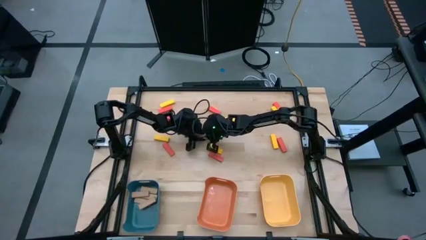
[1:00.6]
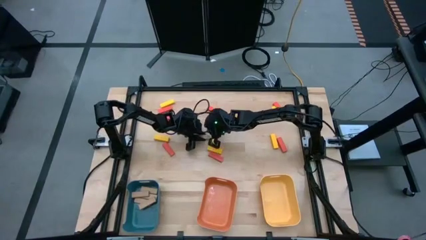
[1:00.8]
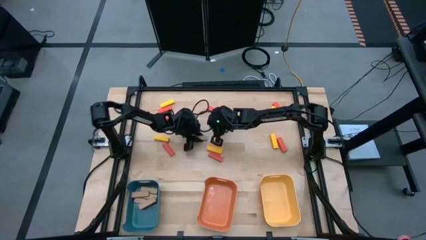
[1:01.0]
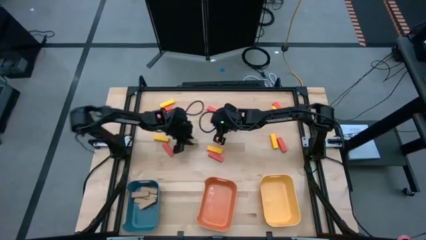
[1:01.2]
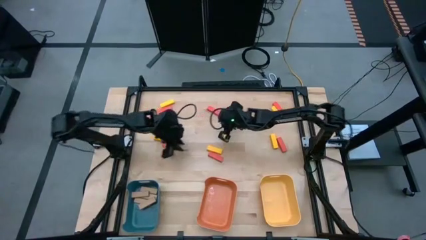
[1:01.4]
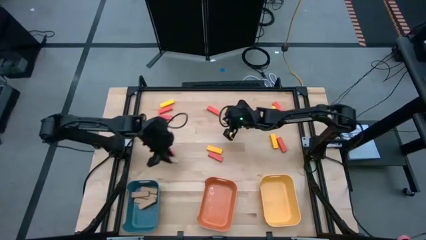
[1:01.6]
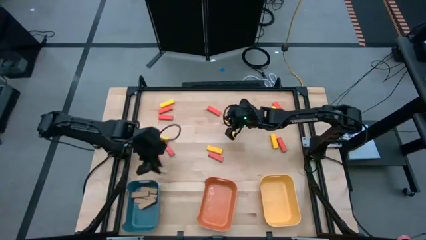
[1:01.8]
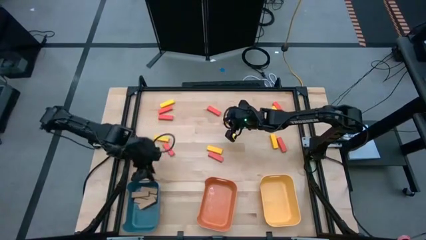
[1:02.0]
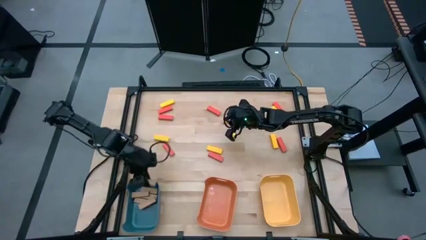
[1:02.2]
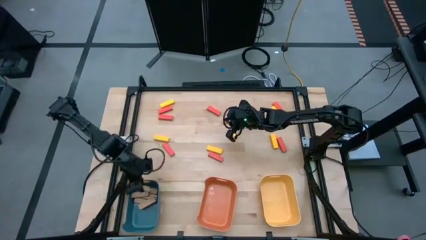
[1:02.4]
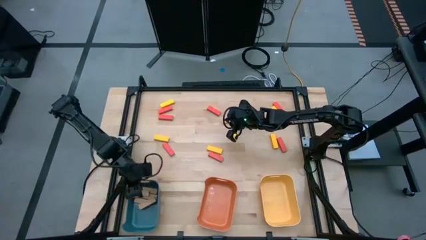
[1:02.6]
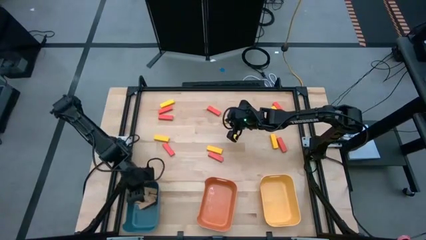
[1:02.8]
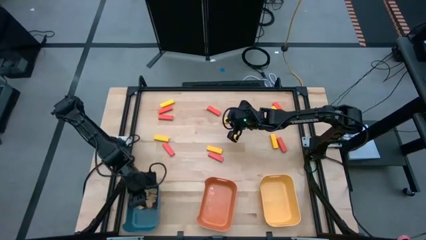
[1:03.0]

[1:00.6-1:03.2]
Task: Sort blocks
Put the brown block into the blue bin

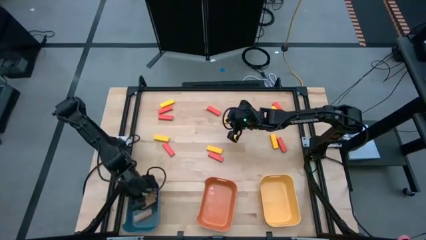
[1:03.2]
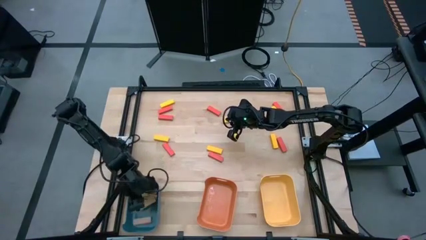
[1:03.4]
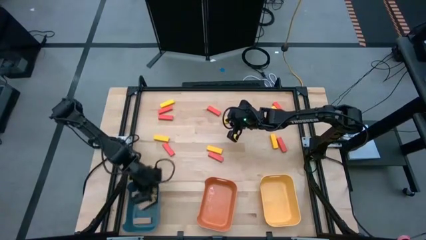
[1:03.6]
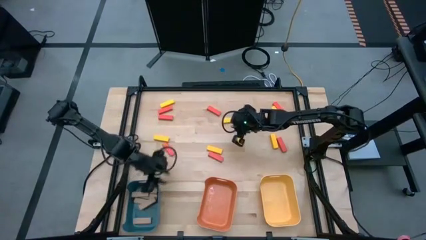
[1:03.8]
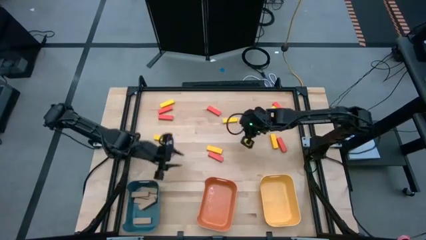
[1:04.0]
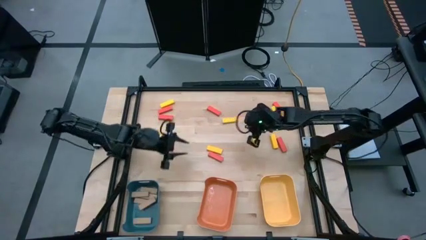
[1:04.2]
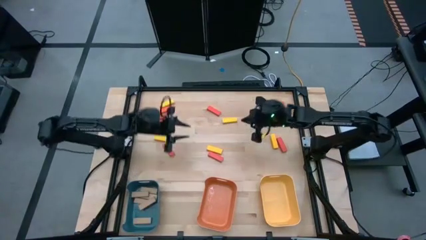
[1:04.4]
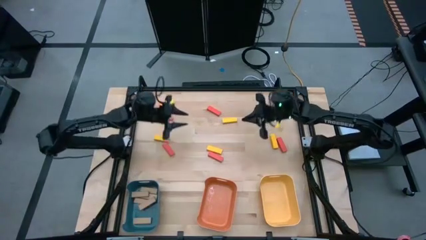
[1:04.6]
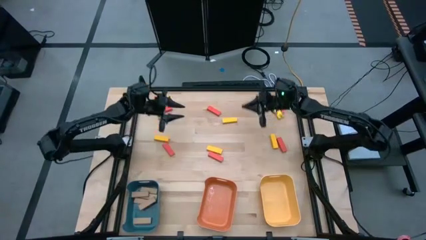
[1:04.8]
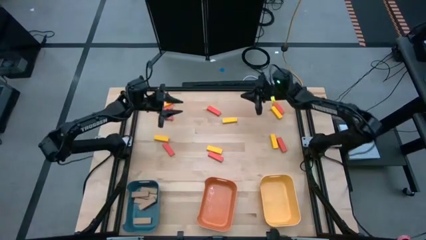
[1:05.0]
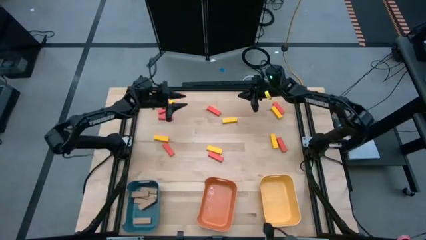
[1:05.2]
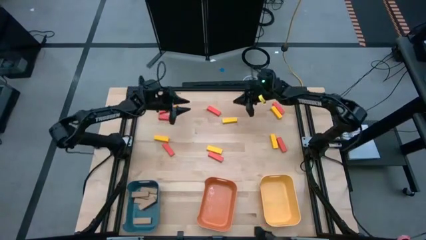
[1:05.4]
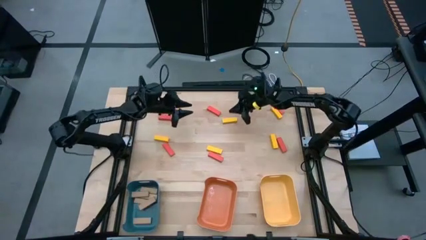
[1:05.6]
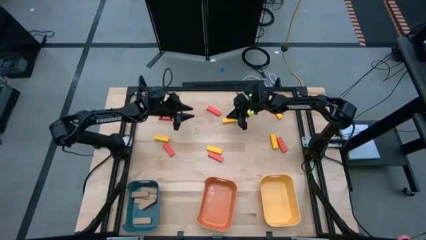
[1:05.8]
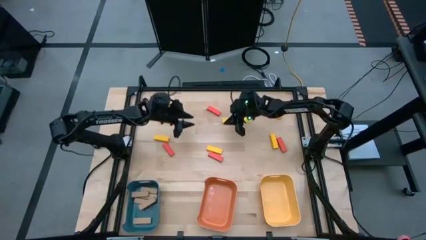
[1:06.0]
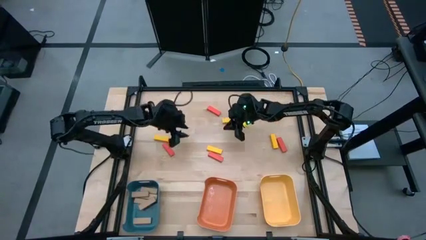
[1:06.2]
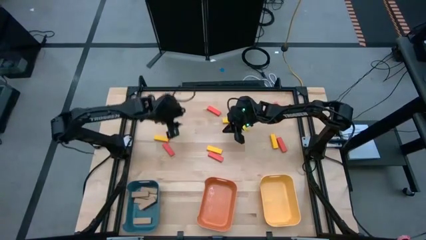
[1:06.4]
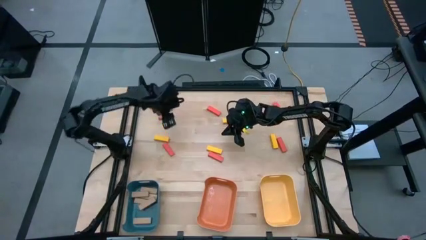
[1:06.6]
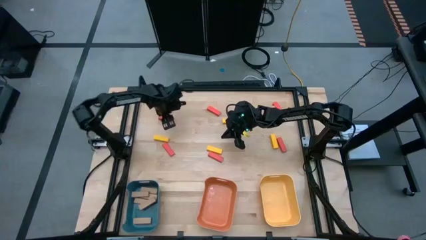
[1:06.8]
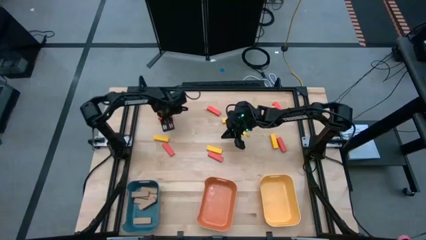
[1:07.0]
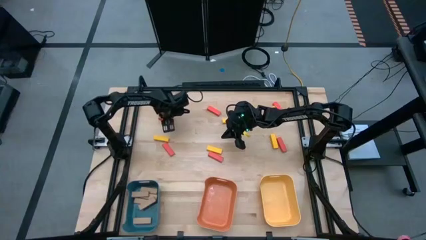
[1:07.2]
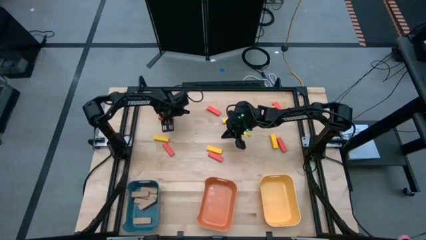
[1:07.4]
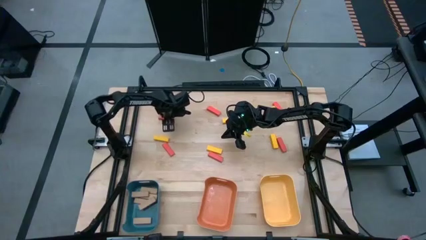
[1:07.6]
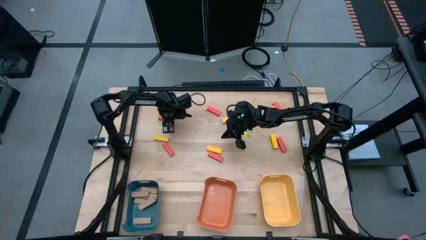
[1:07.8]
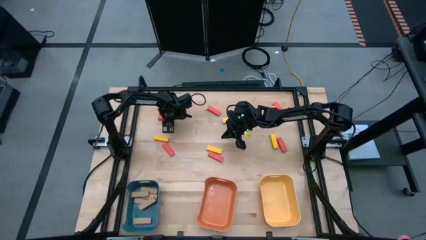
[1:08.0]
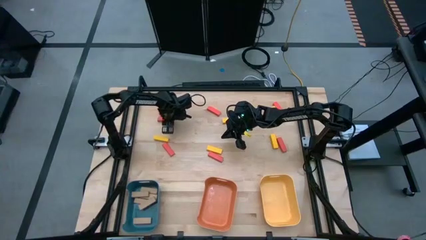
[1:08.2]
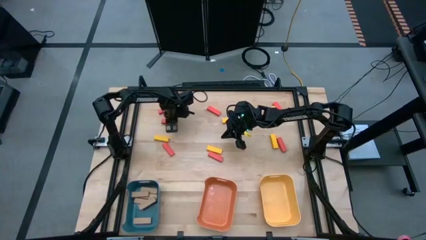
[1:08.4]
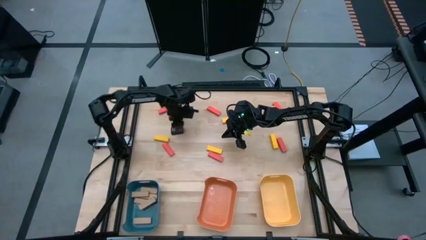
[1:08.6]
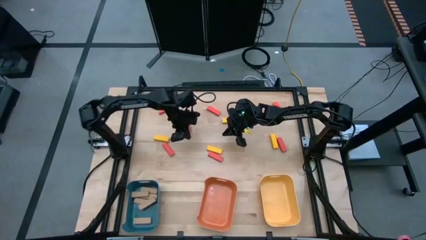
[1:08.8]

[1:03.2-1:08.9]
Put the top left orange block into the orange bin

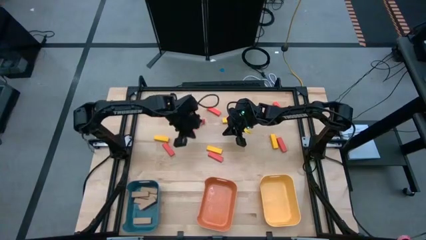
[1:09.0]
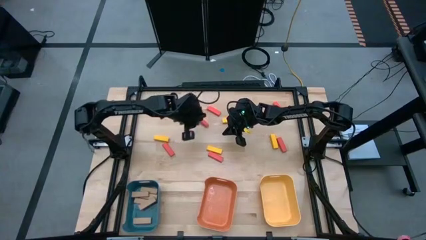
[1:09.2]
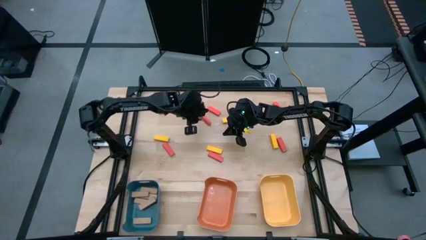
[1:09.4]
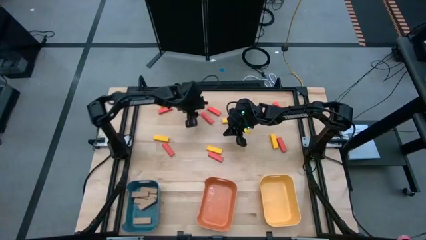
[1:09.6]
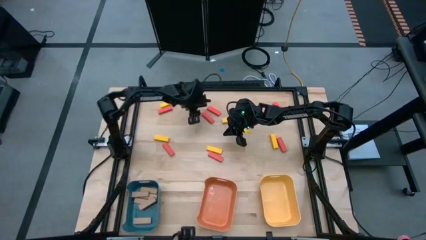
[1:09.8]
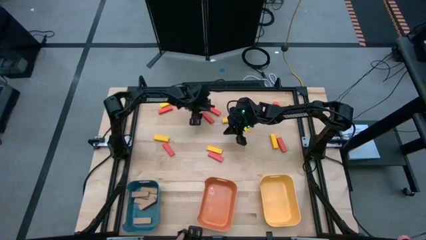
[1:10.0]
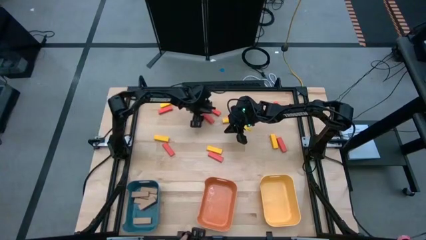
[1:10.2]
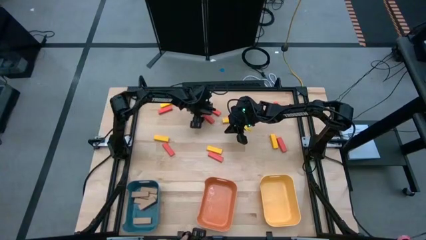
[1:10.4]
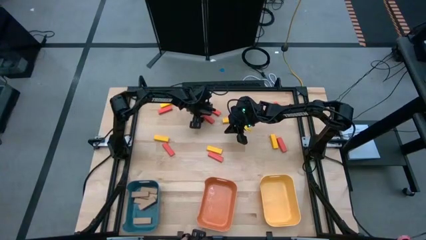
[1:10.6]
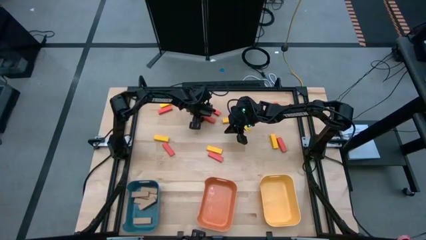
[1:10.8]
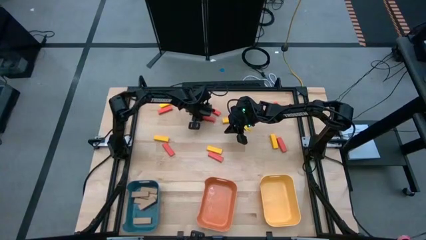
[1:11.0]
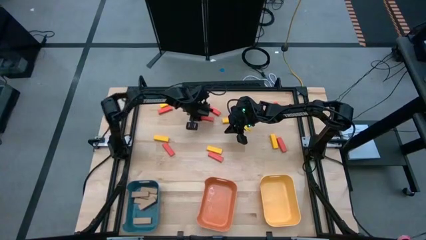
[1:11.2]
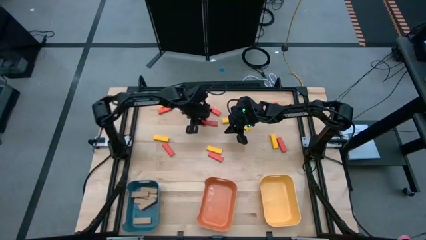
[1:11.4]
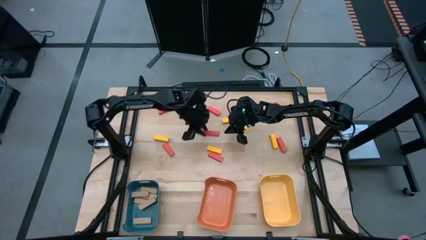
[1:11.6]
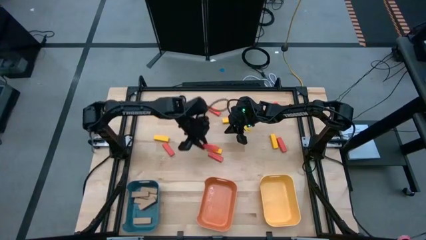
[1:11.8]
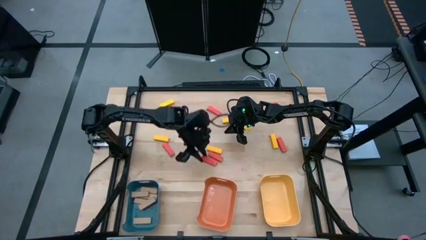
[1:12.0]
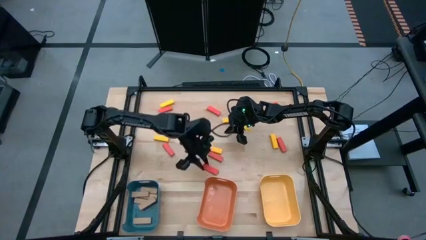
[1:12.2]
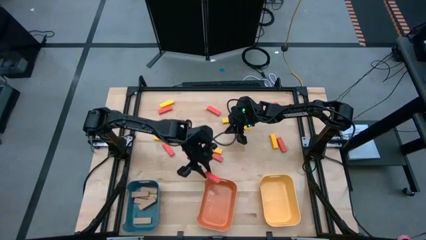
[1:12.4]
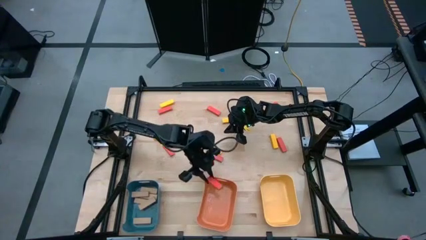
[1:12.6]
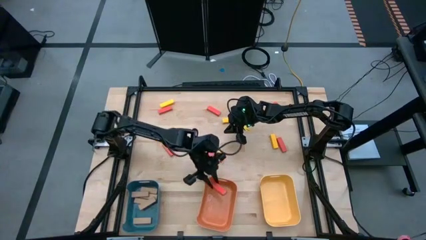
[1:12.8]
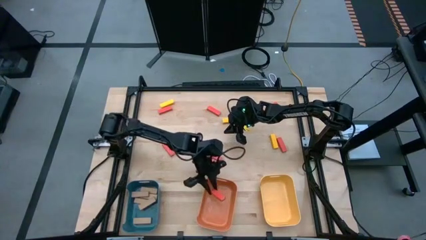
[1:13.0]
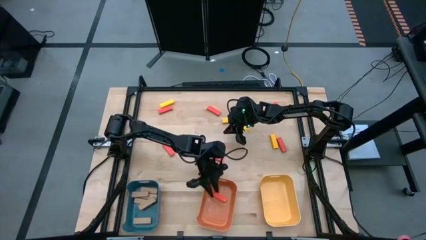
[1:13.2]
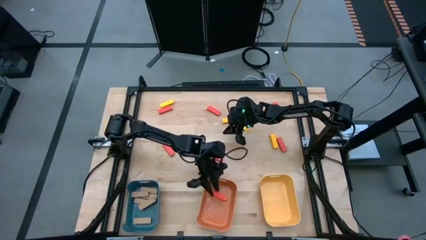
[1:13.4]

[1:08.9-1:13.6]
Put the top left orange block into the orange bin

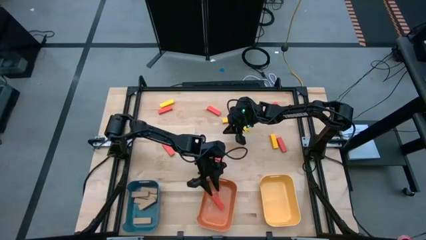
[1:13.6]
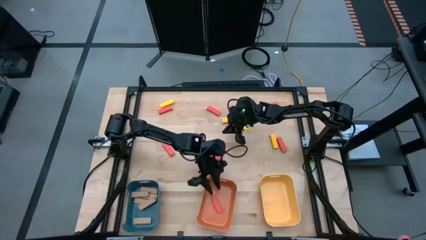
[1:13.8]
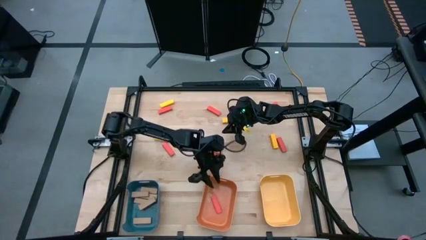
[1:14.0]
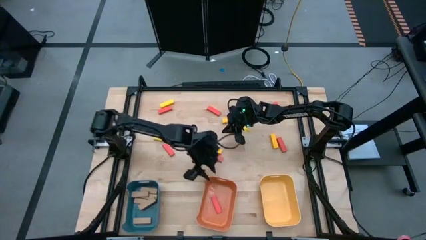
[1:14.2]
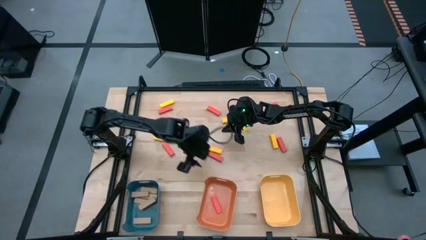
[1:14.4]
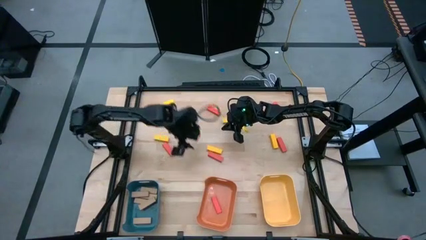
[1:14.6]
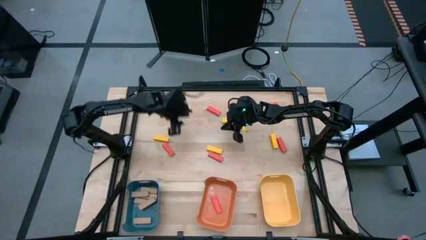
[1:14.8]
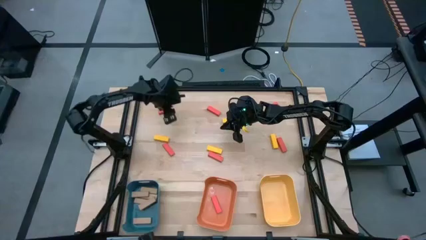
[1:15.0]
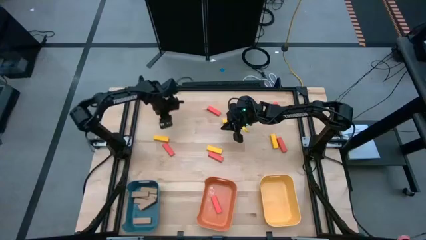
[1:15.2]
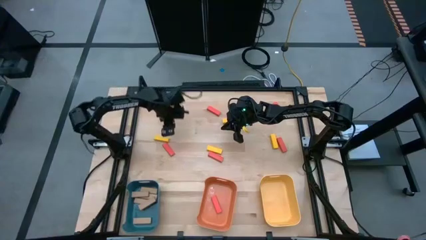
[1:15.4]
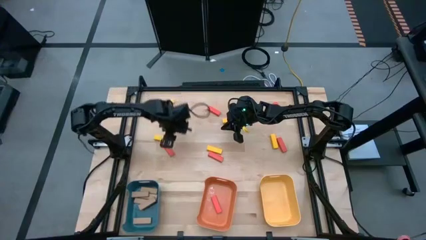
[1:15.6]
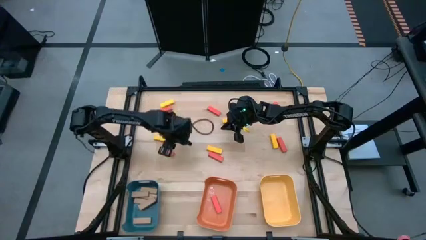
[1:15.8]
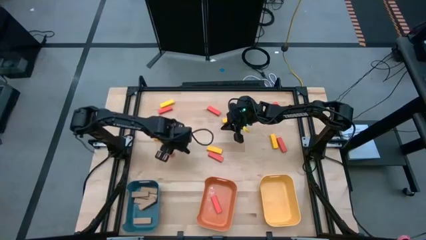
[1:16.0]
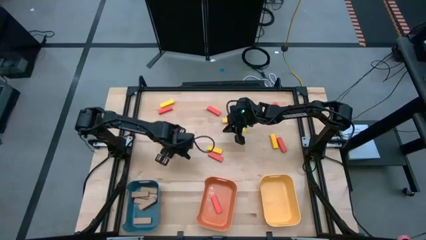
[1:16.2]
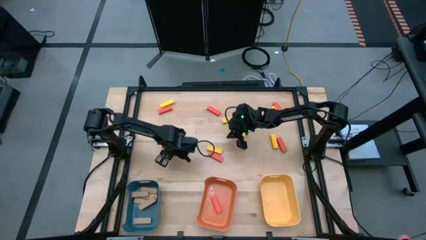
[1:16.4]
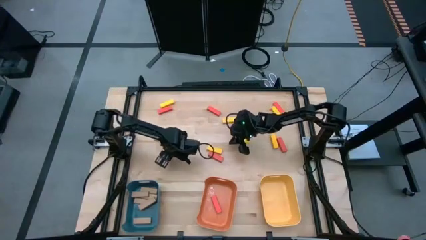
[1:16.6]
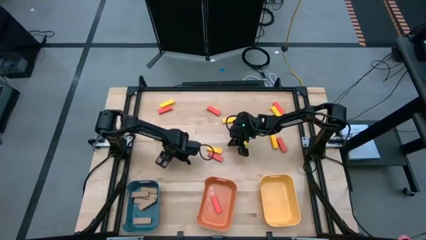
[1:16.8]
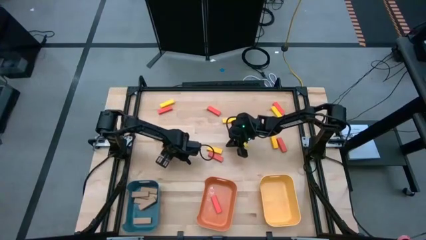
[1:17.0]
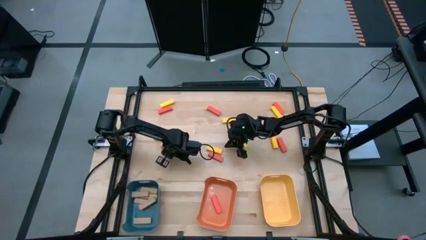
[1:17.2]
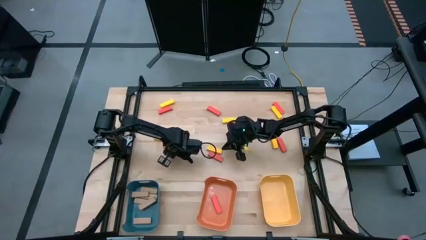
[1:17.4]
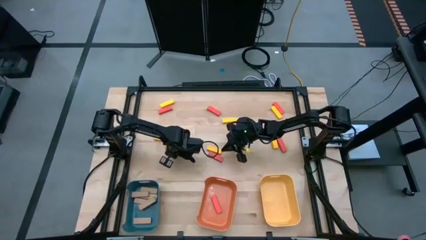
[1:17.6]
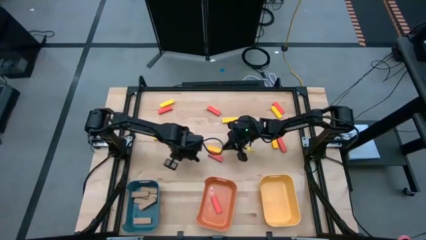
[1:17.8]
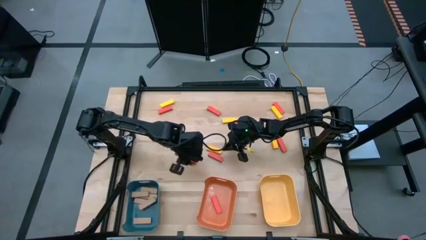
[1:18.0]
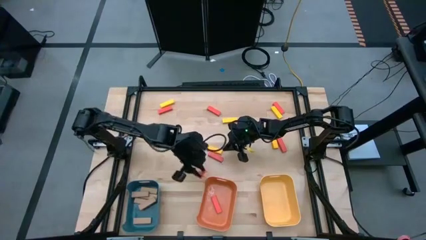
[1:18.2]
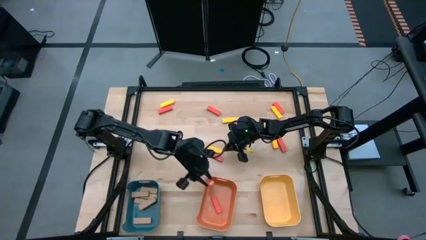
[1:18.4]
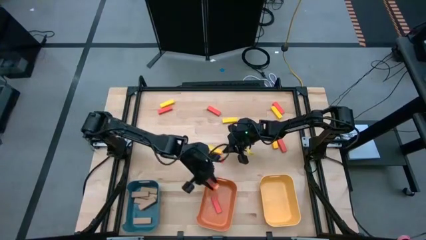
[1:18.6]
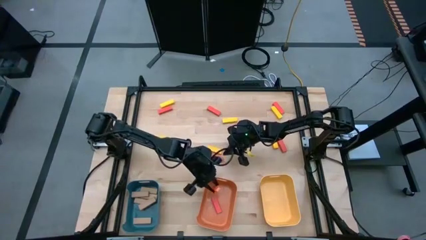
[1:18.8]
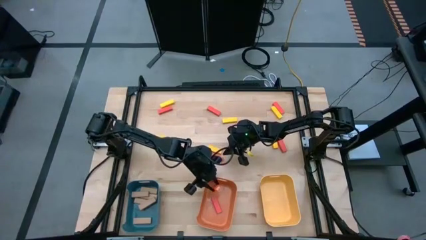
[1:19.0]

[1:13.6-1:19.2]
Put the bottom left orange block into the orange bin
